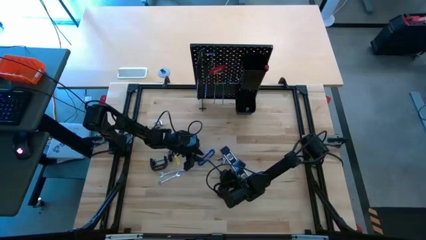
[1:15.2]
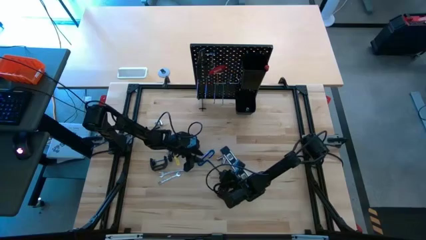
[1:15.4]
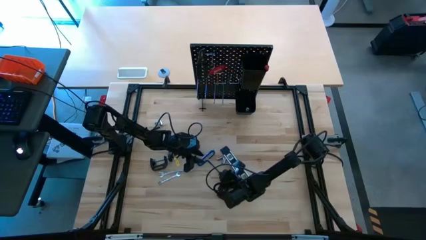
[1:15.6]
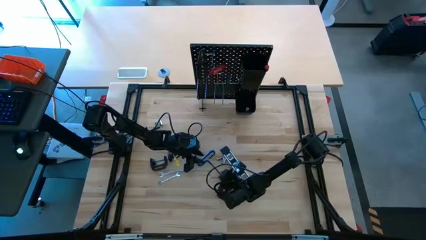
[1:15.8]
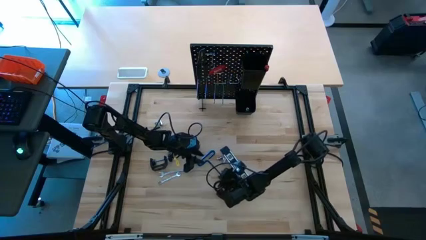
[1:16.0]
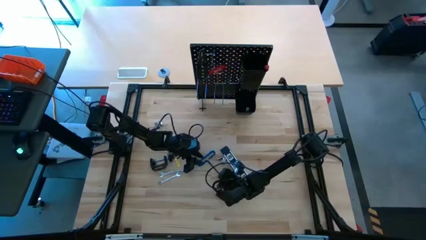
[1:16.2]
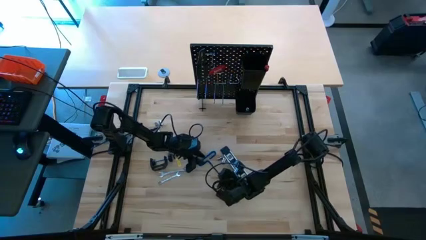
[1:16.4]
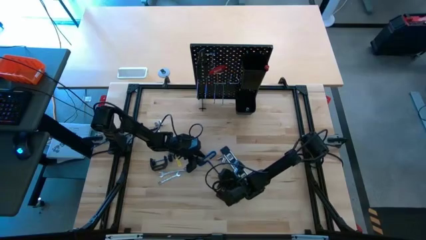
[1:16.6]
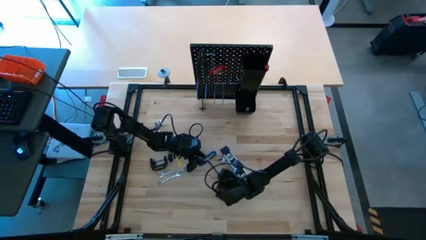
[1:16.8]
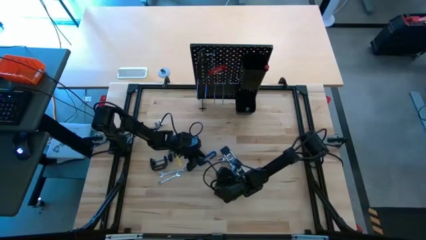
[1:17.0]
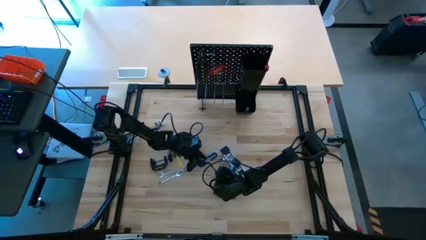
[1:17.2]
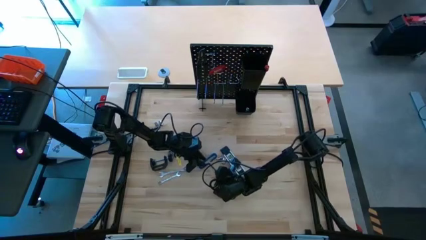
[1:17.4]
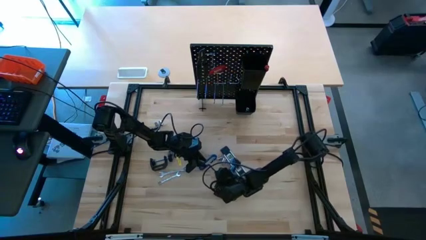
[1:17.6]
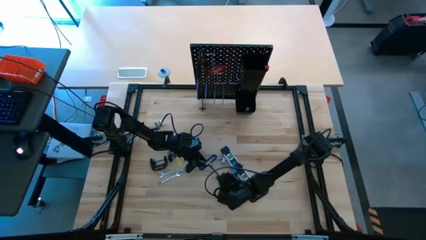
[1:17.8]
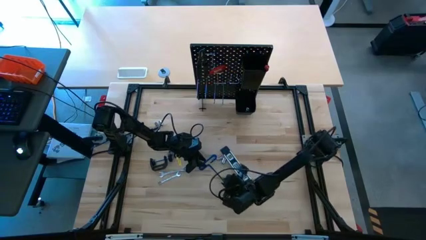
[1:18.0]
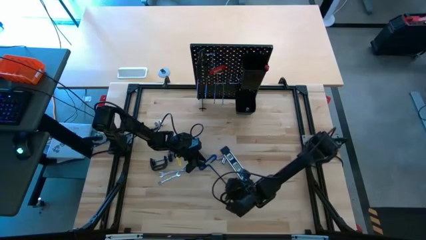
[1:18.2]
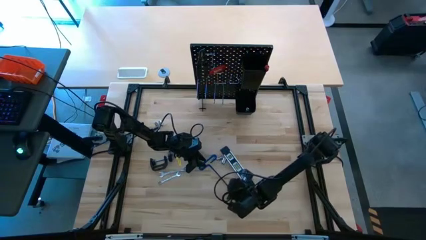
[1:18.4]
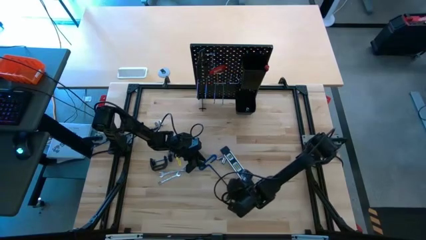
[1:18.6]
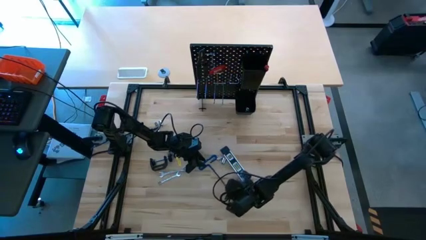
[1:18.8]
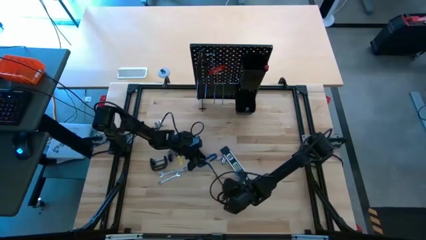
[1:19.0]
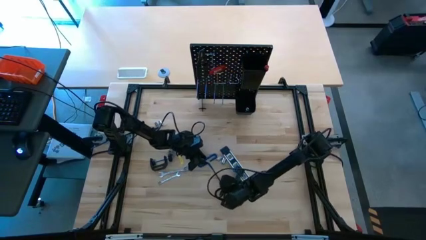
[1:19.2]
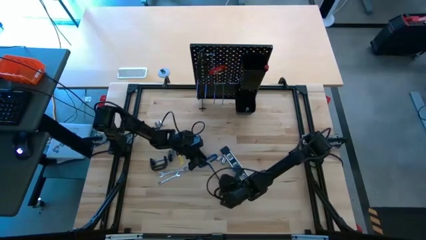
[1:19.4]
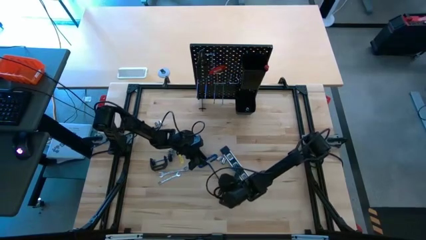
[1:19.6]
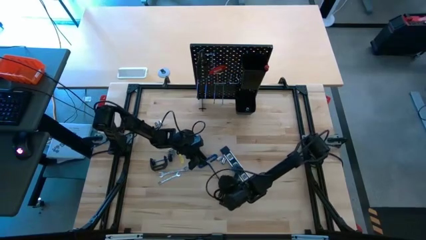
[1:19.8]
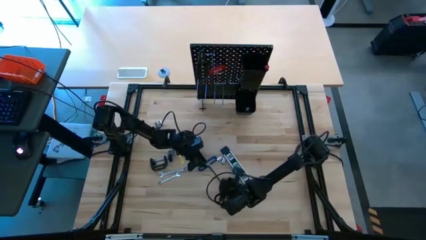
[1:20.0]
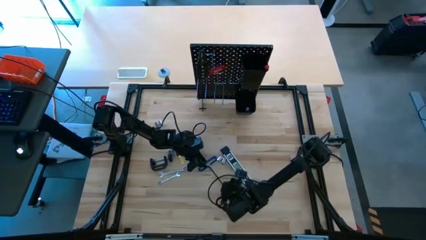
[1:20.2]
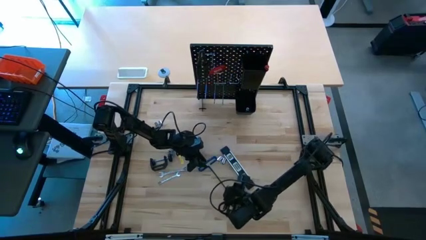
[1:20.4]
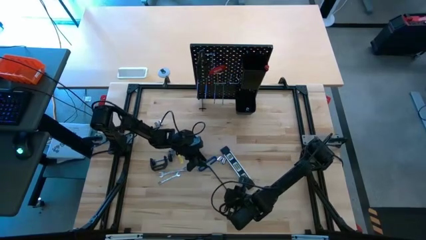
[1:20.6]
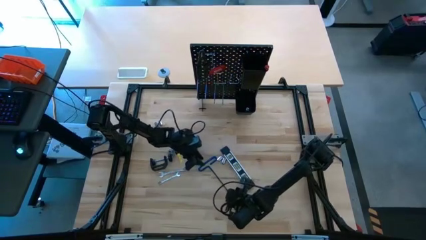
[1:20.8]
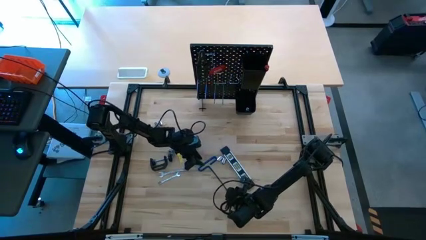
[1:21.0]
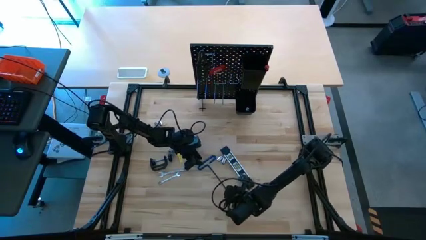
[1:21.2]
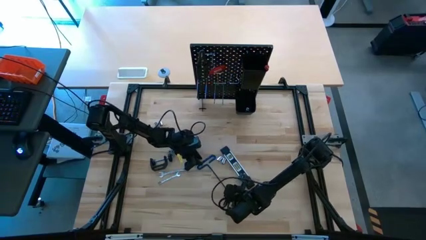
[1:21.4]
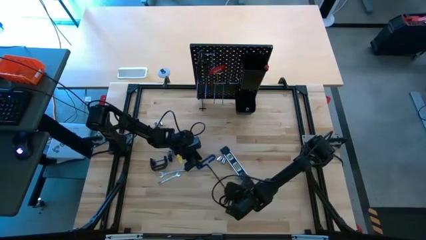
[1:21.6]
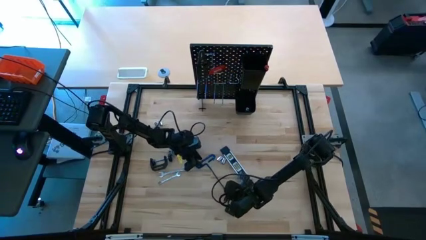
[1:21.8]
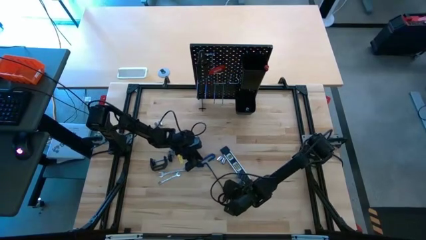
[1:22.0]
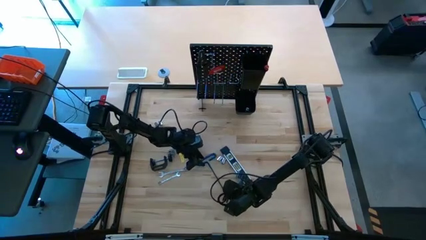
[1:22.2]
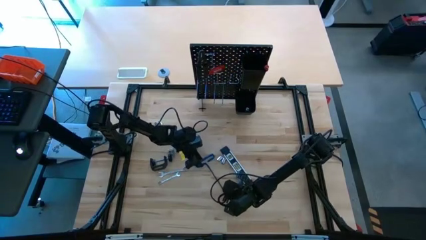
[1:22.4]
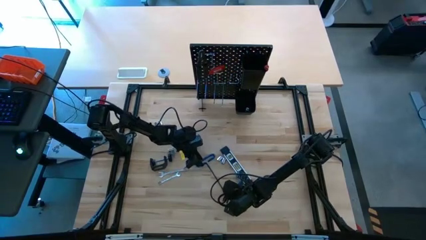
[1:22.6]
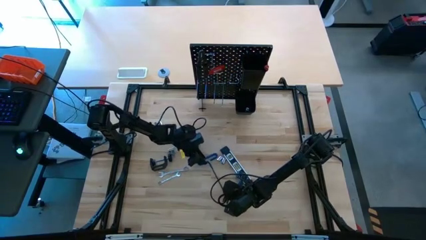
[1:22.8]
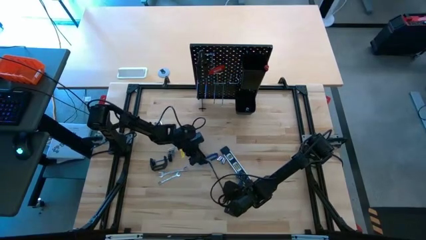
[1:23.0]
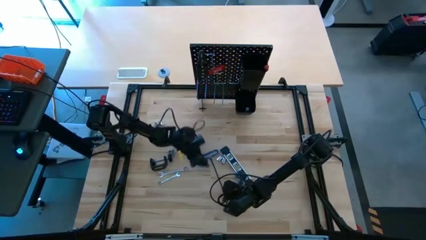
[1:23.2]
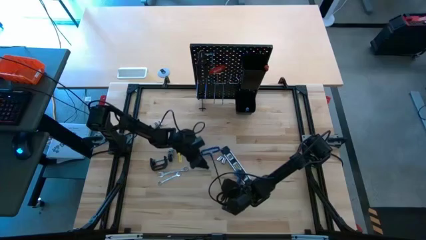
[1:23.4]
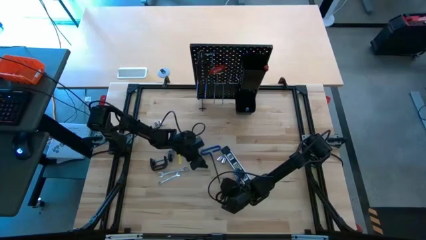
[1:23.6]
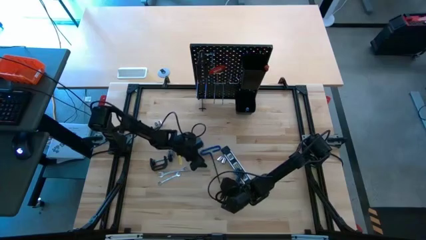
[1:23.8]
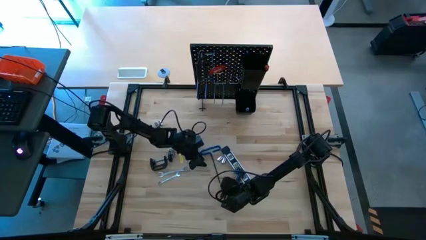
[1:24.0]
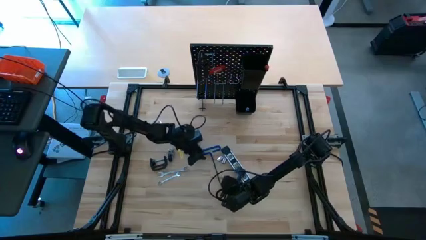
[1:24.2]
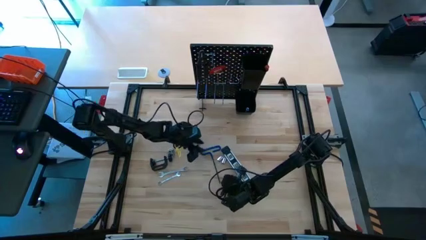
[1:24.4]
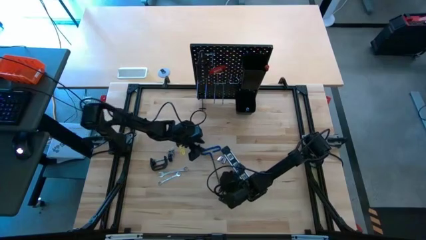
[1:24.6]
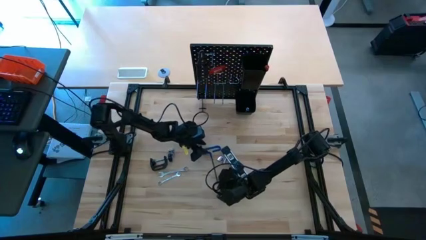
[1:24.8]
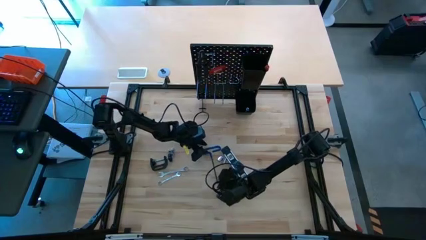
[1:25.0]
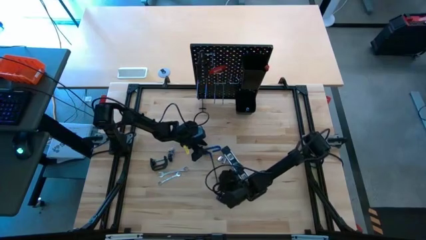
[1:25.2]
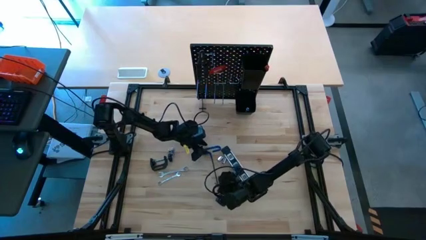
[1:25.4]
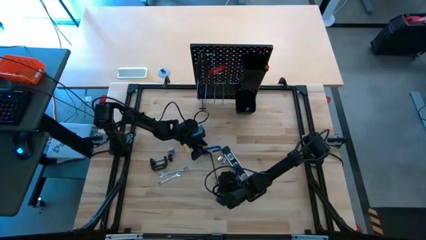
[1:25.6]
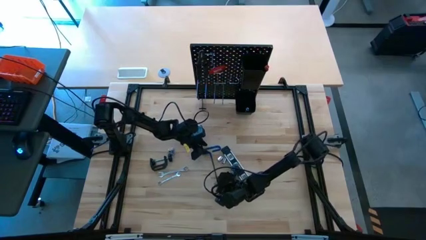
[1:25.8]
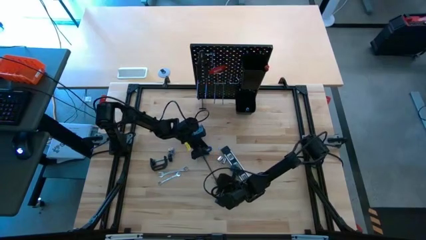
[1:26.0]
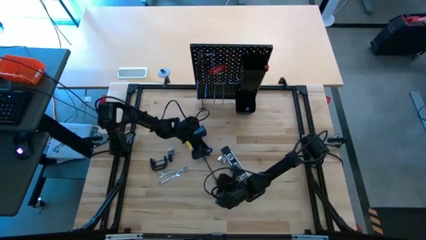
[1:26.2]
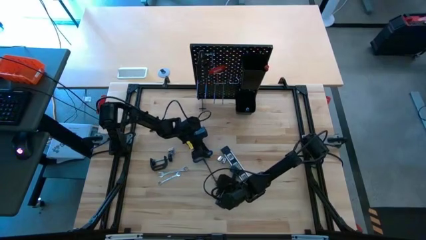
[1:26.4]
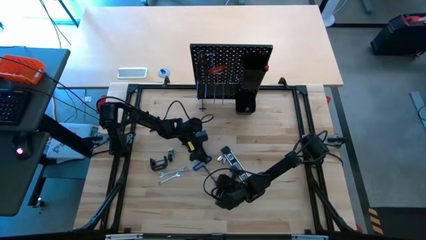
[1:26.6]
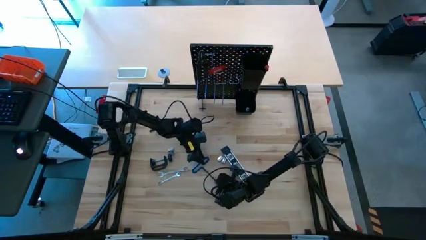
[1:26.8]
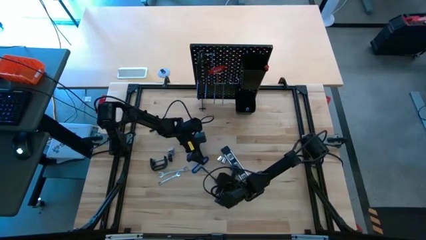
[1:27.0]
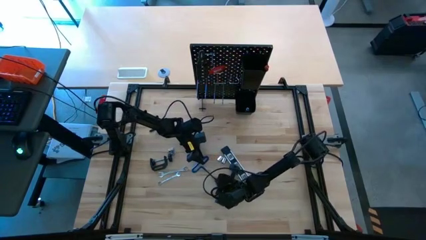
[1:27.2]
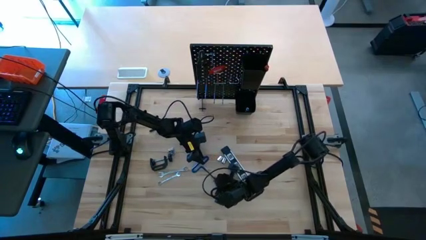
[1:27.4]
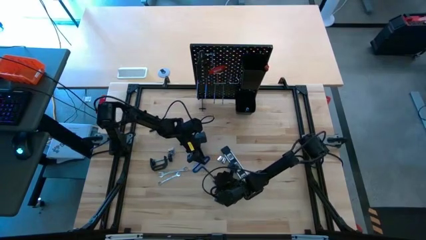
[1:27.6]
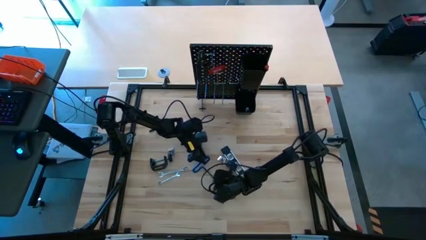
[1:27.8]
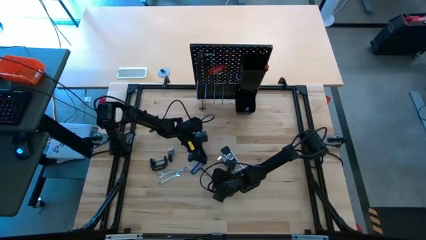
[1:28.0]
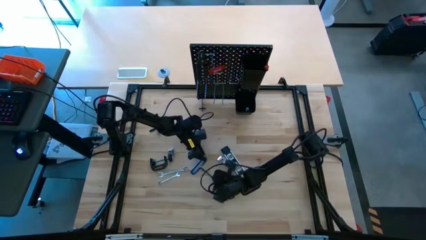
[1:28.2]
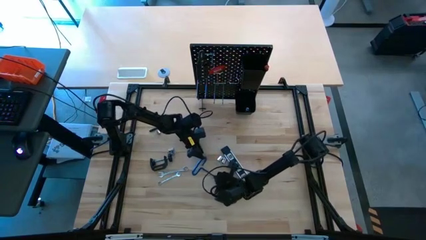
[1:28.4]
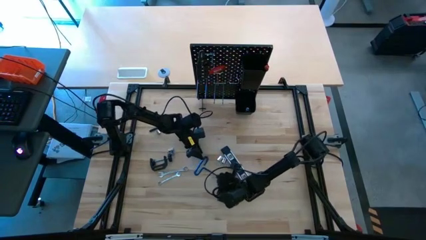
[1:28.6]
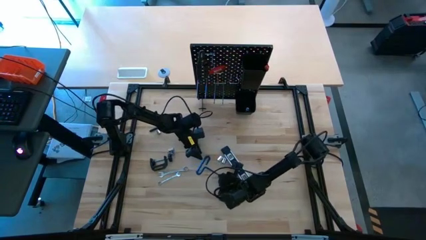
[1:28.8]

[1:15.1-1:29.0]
Task: Hang tools onto peg board
Put the pick tool into the top black bin on the peg board
